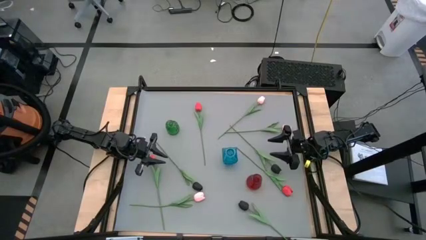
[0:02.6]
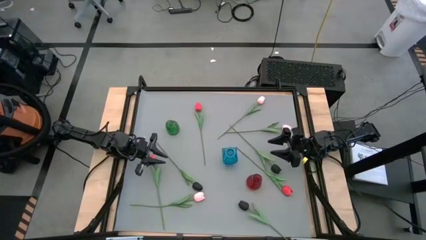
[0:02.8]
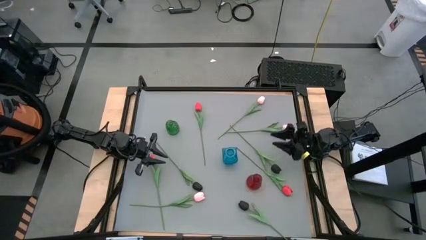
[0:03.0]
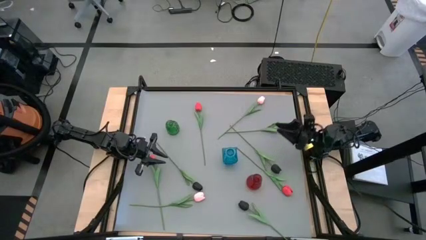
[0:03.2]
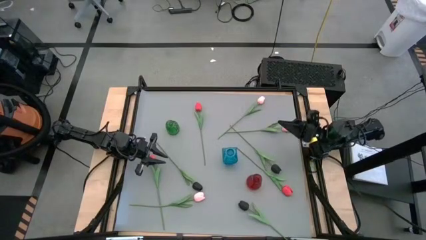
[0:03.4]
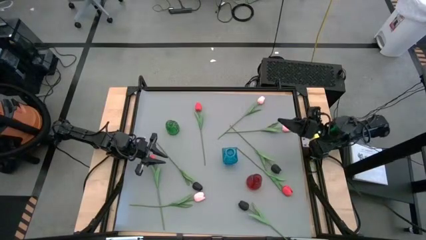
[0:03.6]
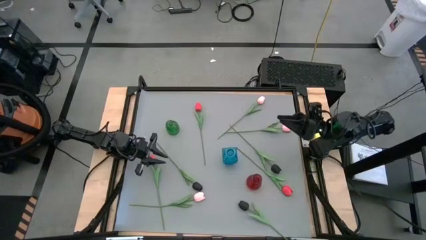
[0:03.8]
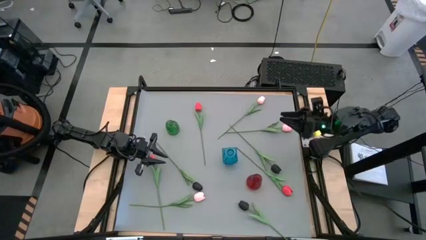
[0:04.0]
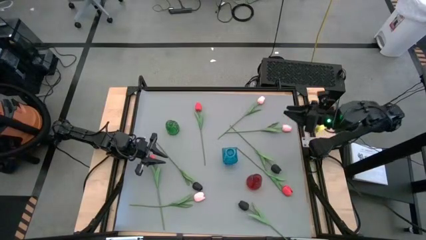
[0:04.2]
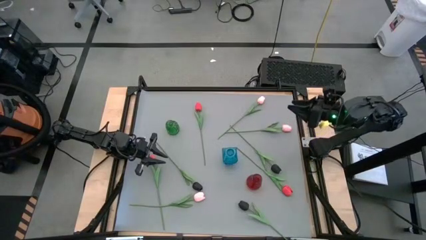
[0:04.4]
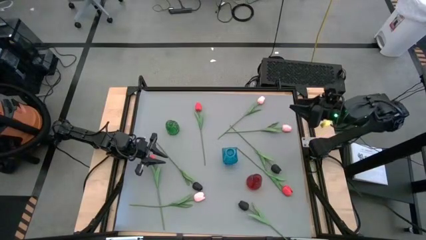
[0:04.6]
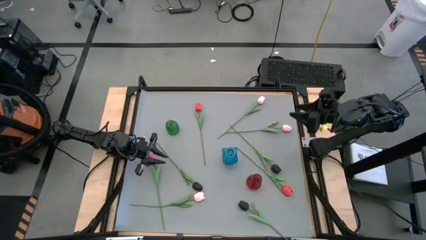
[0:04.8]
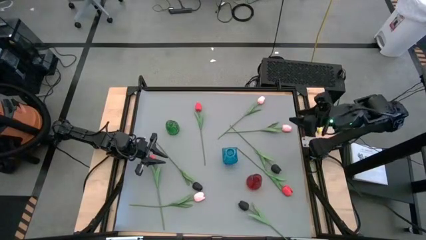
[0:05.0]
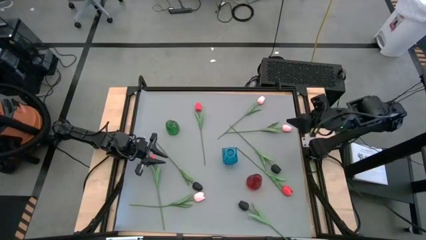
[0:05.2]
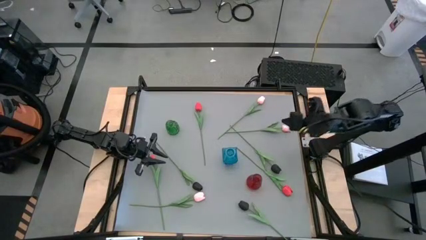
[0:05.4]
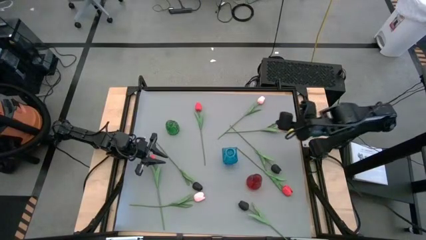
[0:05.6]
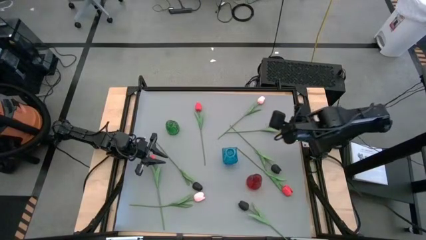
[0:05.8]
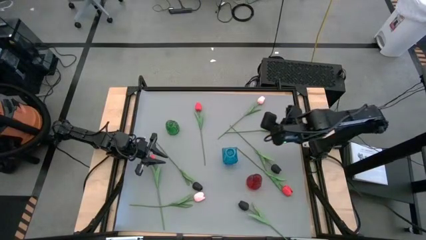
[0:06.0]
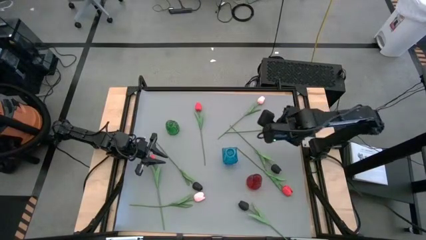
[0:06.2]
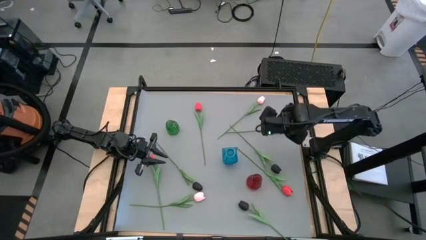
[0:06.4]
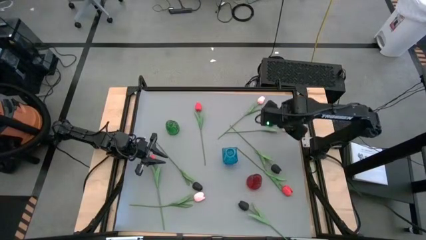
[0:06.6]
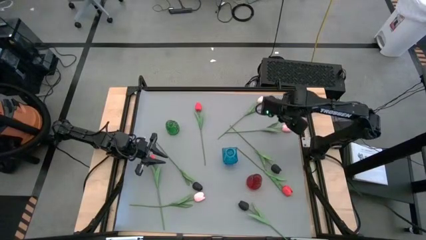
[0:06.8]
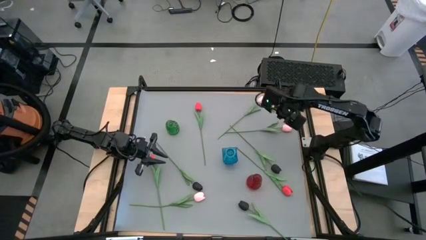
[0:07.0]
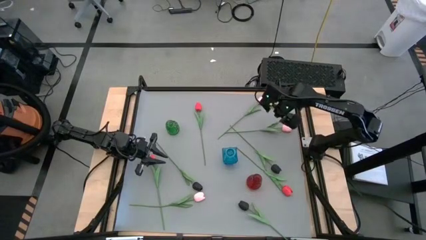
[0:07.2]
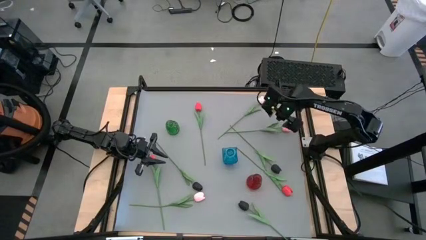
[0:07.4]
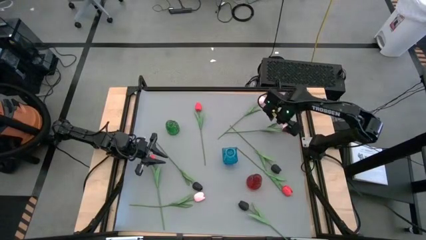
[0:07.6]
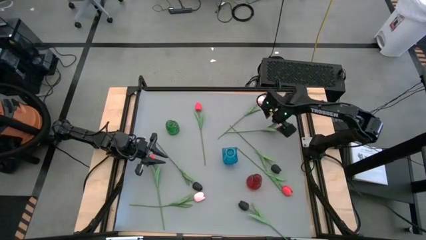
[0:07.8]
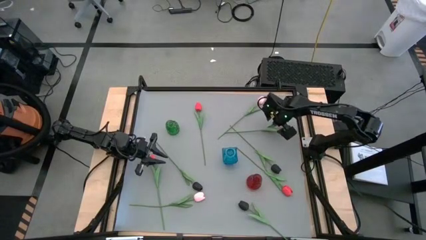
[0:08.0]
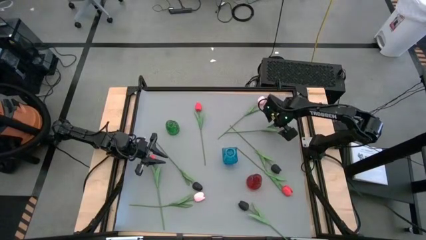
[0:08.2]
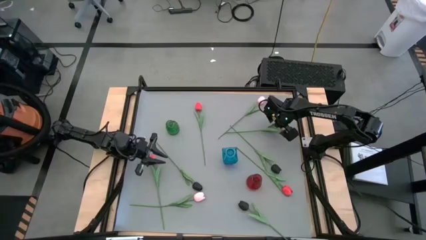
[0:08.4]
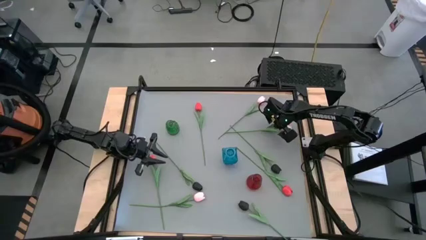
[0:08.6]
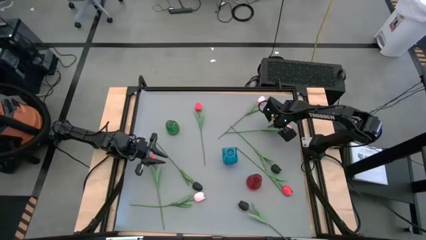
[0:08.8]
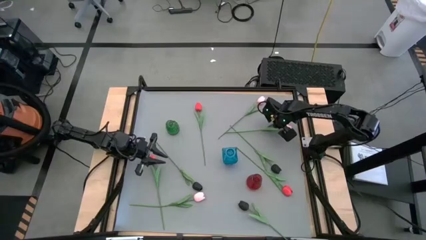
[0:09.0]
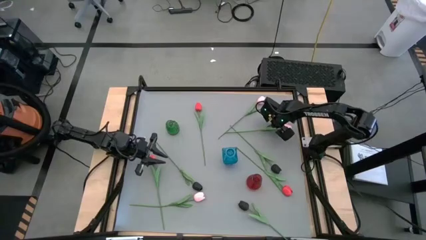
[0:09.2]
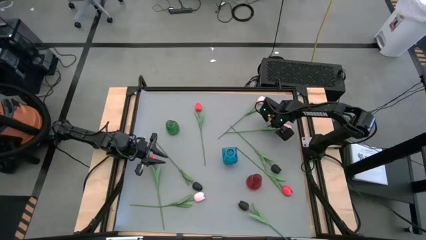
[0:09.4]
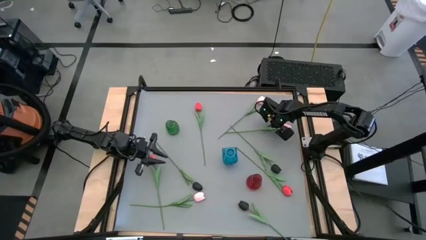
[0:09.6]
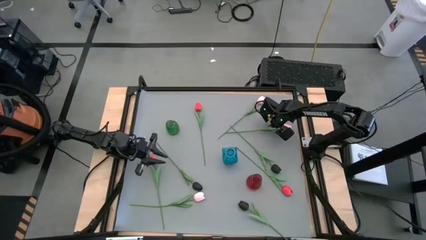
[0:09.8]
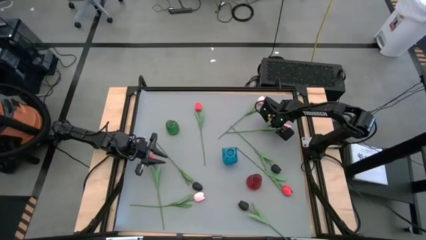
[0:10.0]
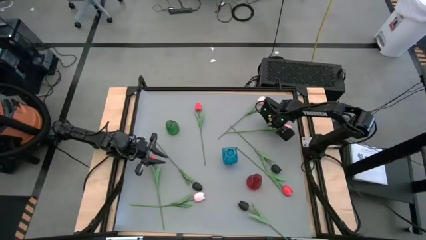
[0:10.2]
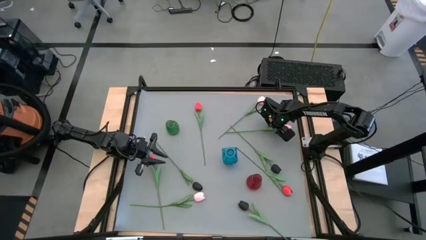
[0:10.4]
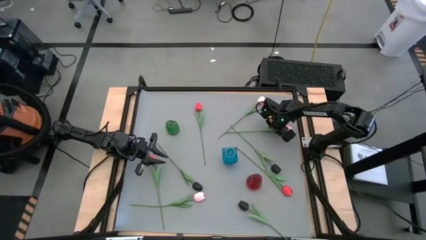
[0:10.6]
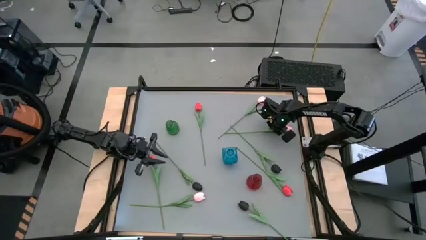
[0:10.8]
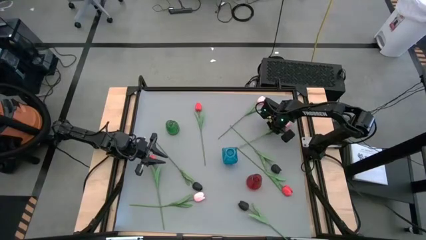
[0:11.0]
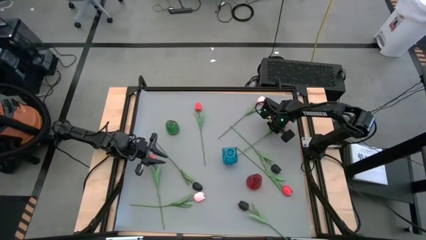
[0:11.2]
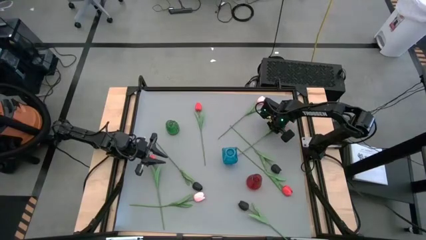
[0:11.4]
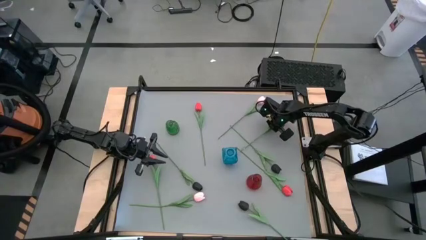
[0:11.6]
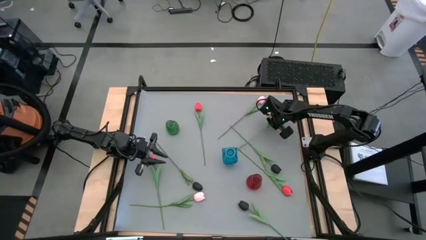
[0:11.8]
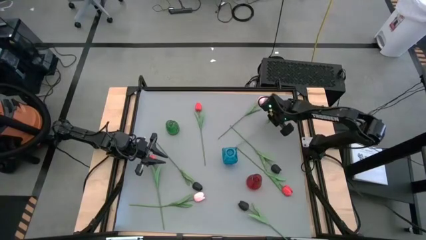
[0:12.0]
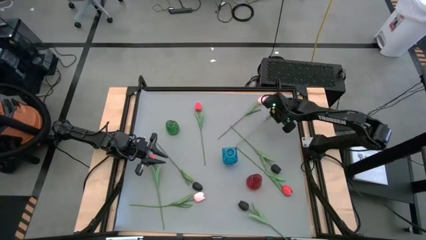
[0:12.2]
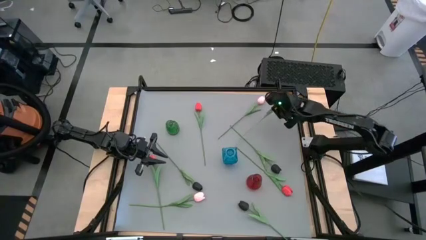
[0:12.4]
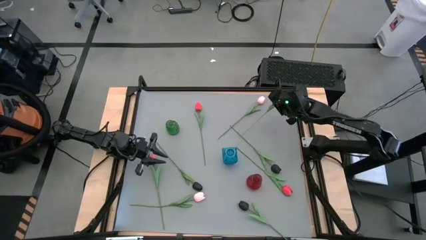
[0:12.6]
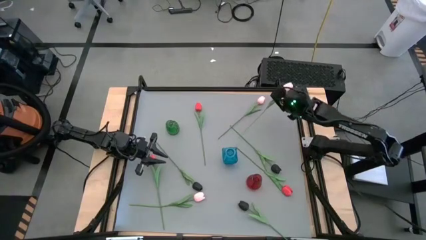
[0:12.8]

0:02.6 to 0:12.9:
Task: Sort flowers into vase by color
Put the middle pink tulip into the red vase
